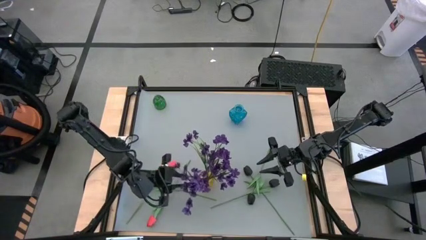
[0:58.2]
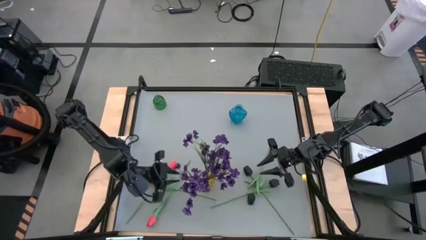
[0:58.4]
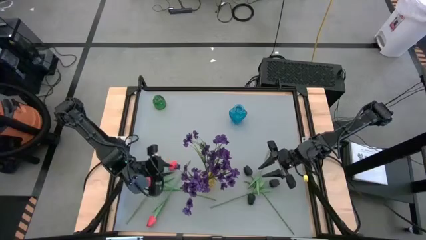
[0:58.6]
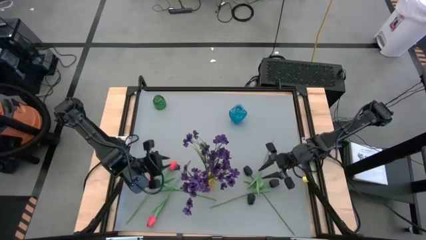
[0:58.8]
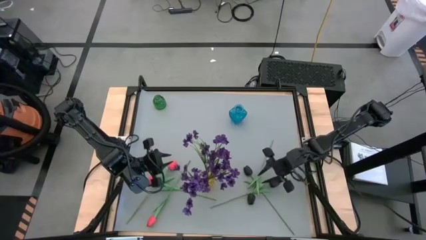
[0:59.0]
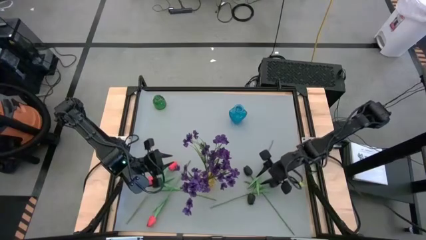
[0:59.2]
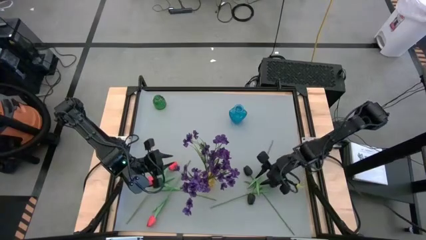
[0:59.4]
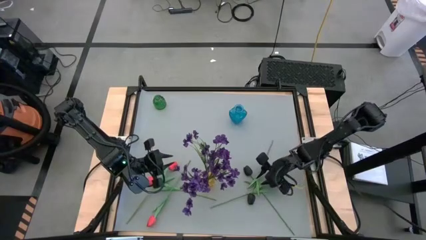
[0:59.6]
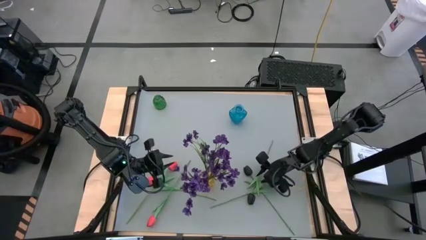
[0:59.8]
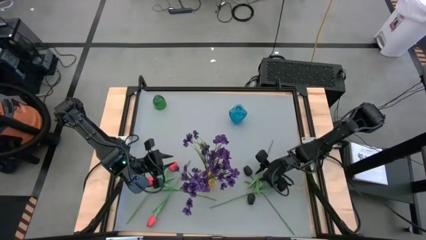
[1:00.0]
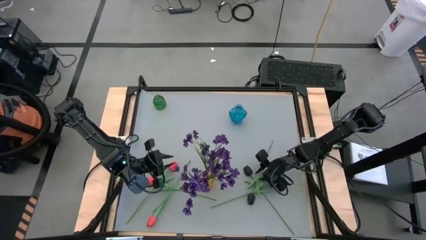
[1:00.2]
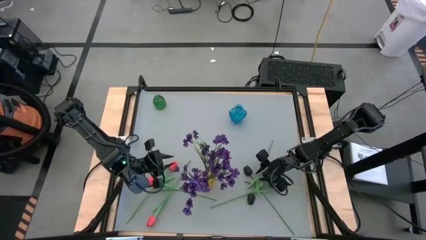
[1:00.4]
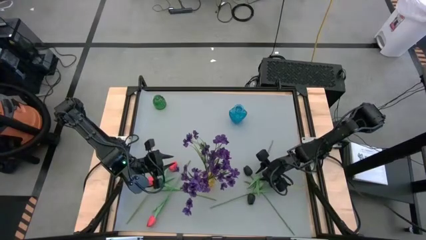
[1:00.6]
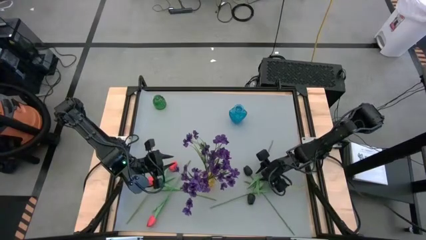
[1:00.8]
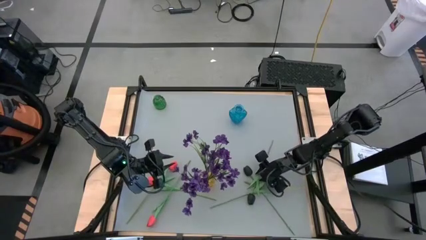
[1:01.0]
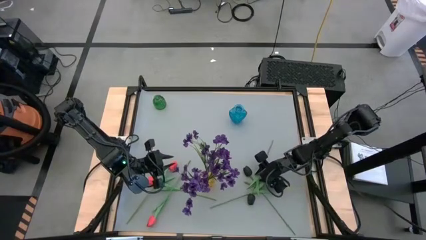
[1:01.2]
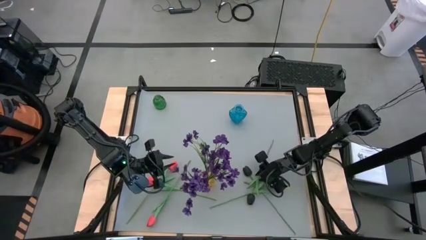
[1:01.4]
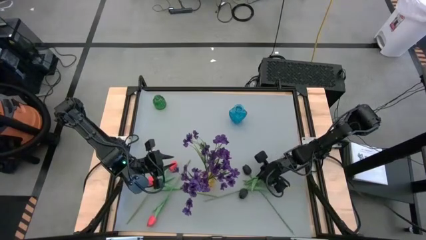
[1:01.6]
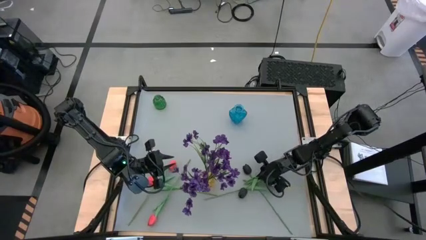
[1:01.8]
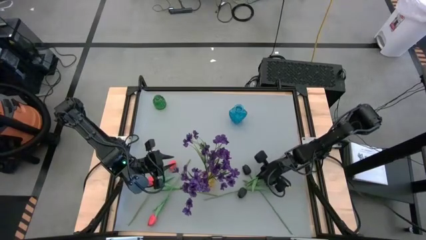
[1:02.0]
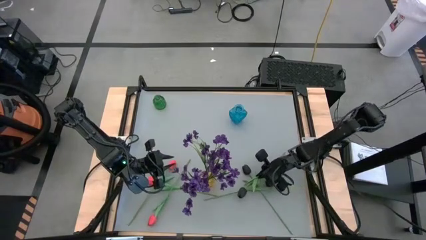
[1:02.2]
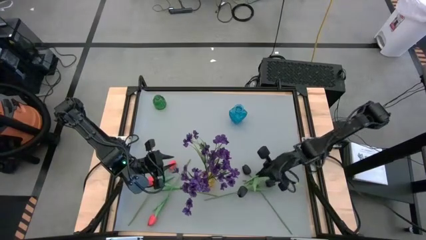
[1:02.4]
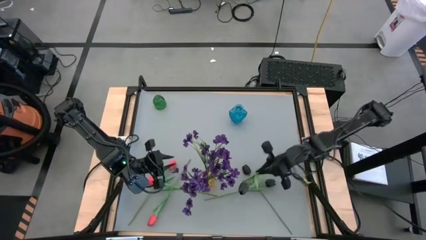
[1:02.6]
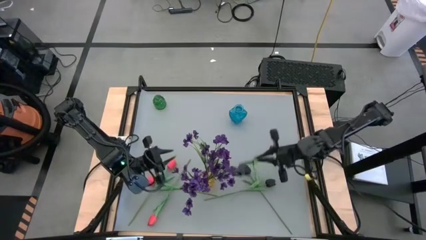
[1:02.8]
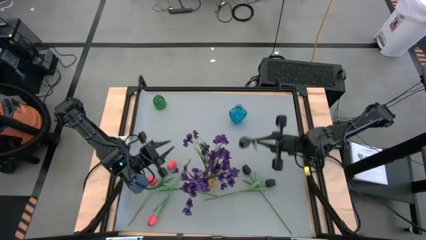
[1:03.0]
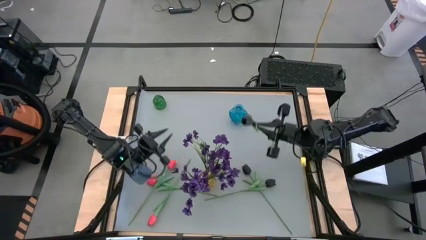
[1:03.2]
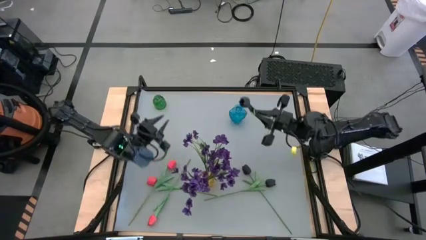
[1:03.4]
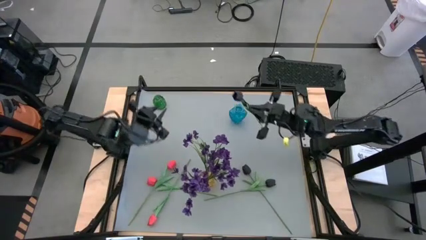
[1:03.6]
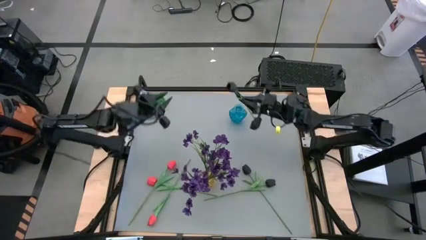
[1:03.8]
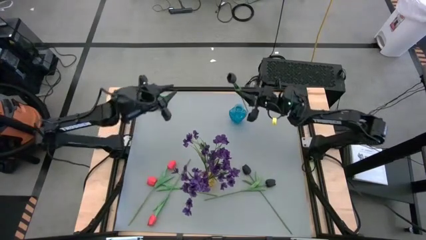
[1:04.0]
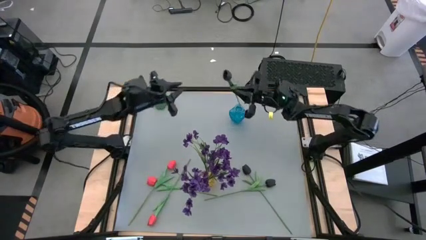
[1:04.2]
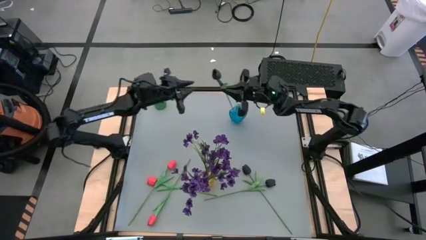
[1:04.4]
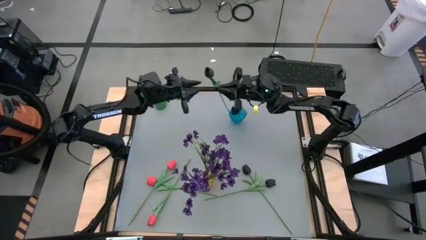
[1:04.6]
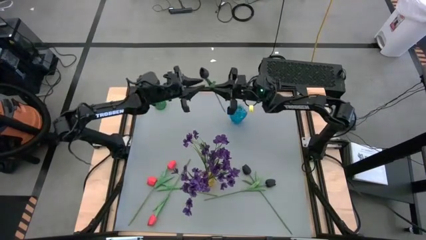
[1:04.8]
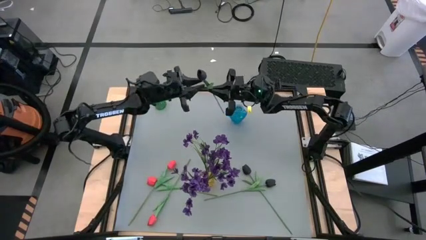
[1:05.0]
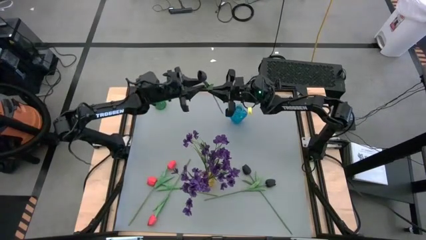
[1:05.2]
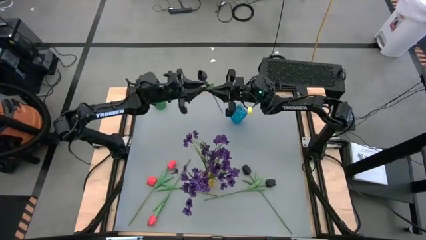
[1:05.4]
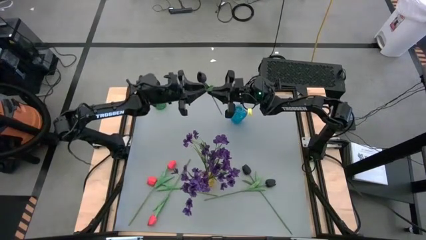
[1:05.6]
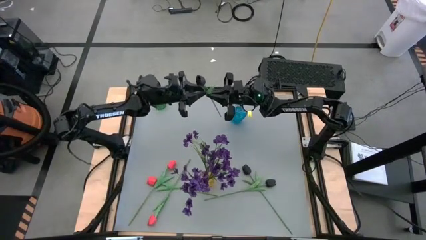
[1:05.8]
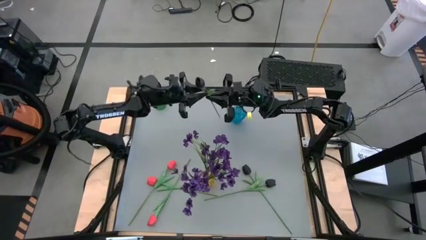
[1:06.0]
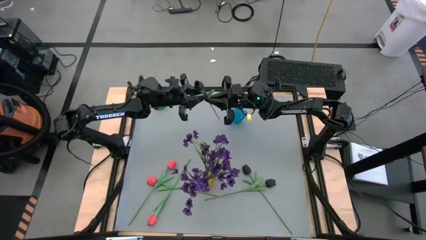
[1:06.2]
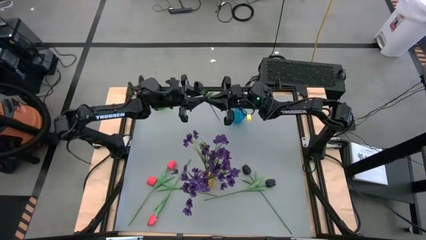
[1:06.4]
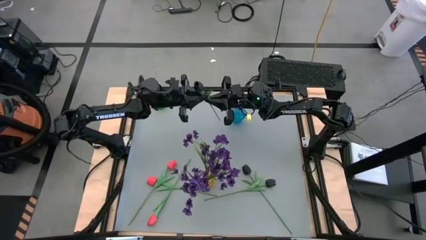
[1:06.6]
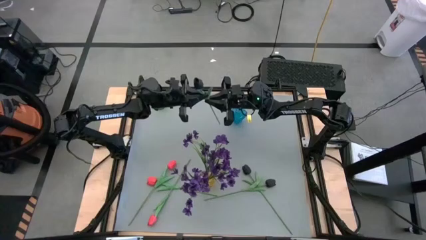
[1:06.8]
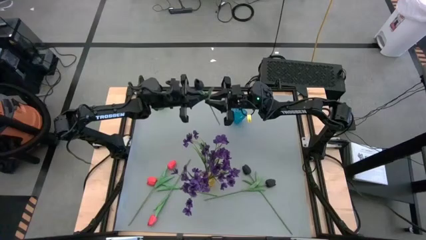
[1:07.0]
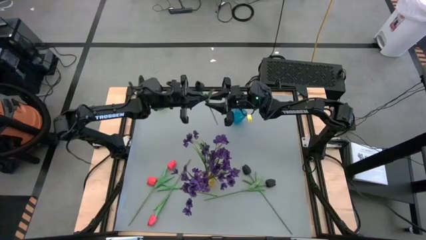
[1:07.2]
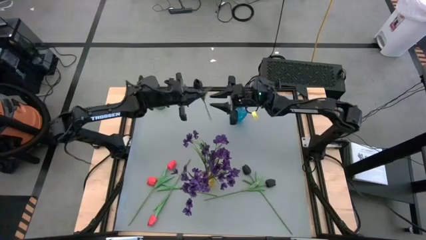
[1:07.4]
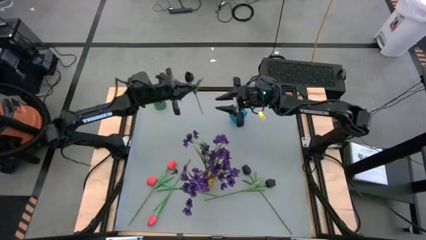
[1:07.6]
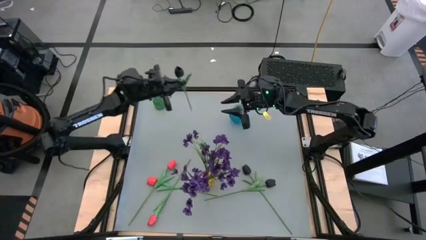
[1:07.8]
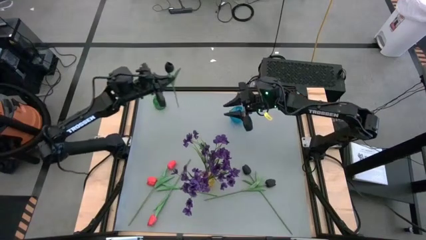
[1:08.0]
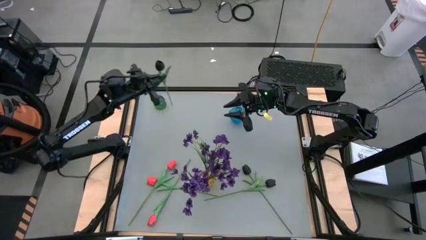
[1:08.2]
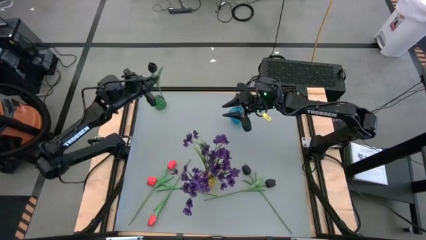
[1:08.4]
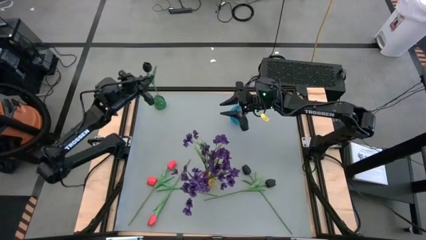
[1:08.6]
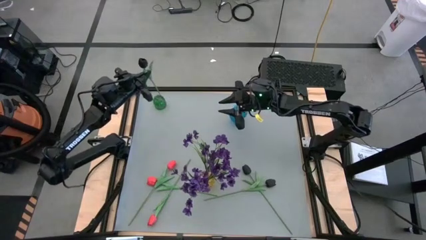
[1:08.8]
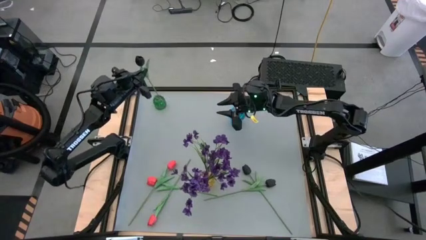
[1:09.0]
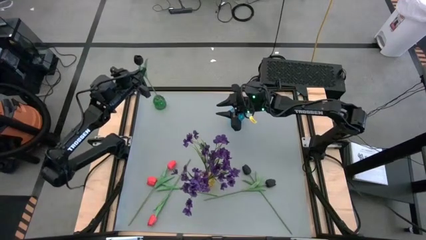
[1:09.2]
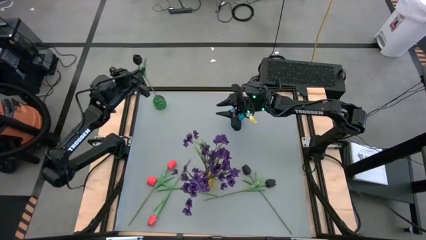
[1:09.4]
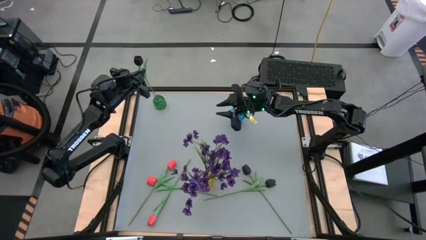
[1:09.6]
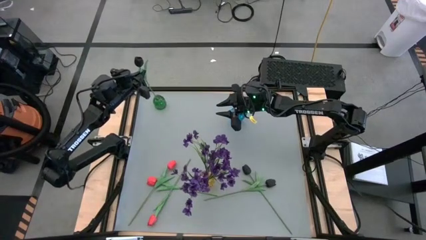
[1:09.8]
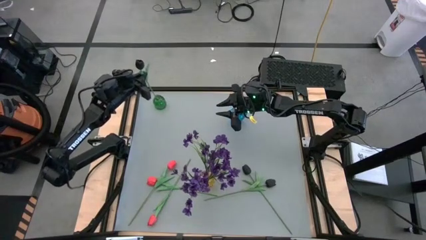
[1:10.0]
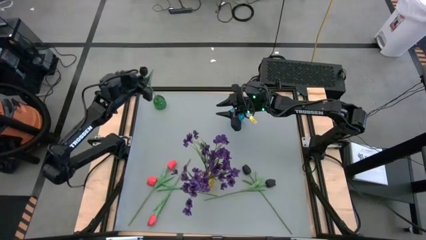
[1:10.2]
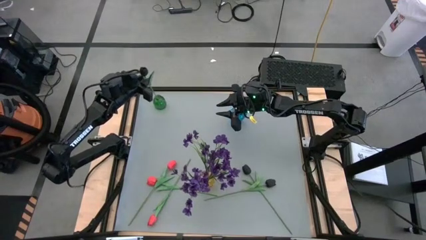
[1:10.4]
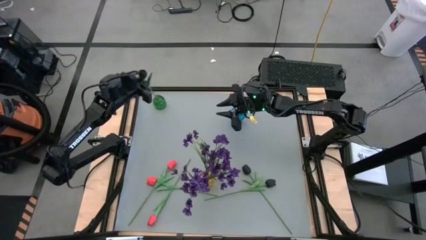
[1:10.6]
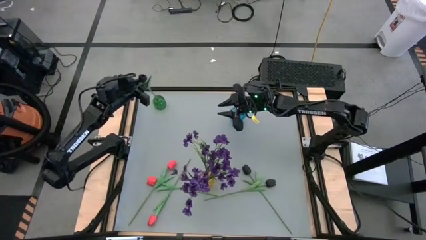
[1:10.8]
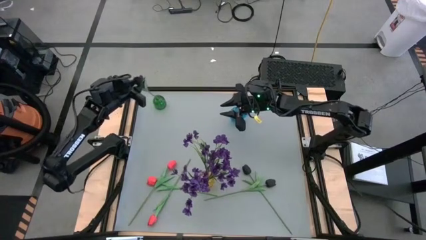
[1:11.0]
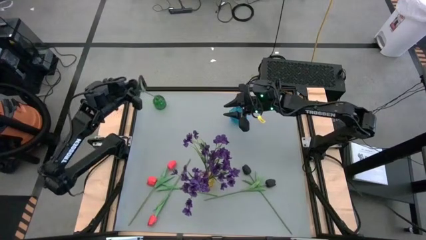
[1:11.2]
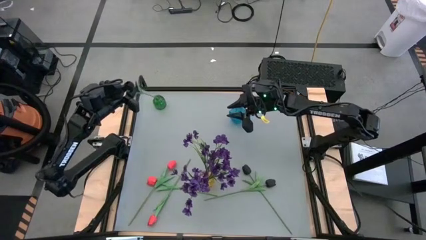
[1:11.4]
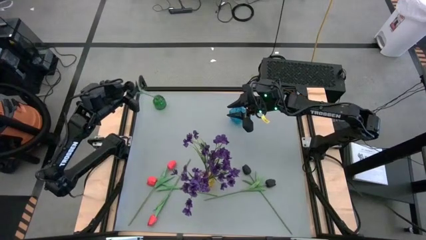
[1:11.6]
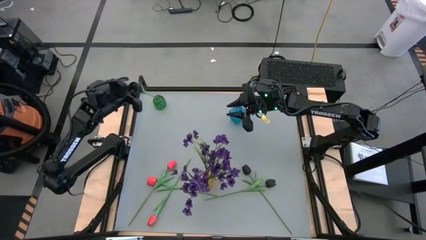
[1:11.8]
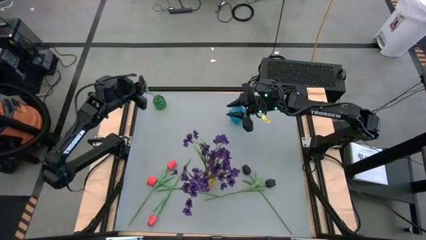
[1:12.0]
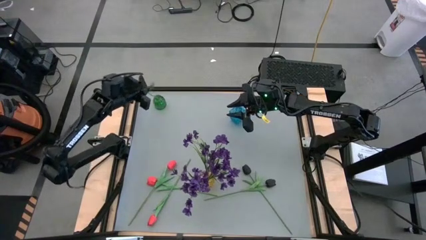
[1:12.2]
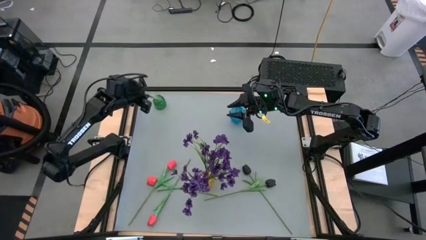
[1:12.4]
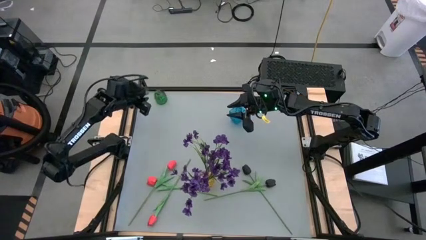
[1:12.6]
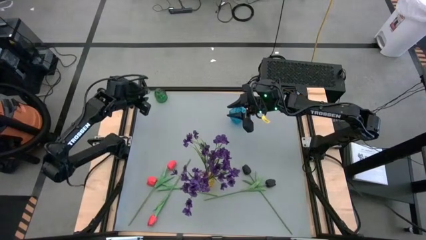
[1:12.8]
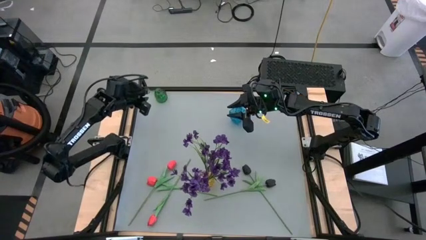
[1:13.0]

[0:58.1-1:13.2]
Task: Sort flowers into vase by color
Put the bottom black flower into the green vase
